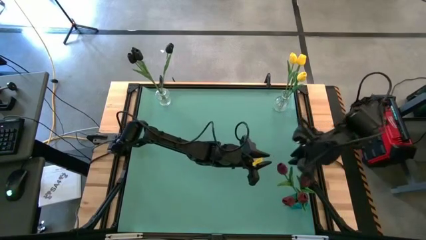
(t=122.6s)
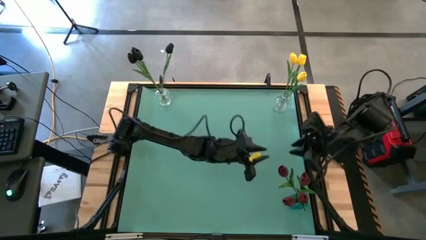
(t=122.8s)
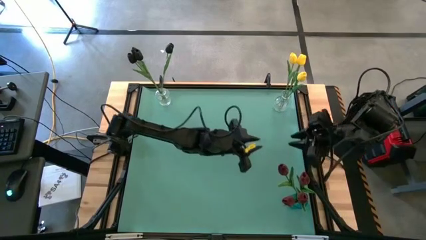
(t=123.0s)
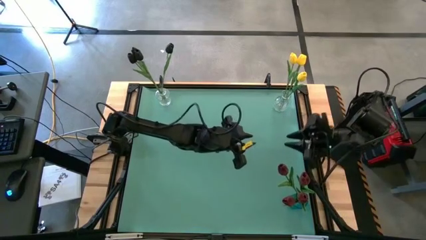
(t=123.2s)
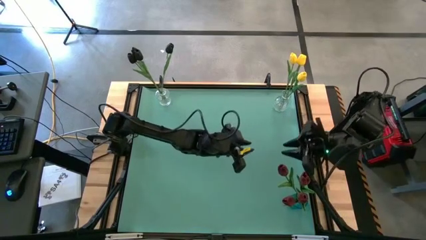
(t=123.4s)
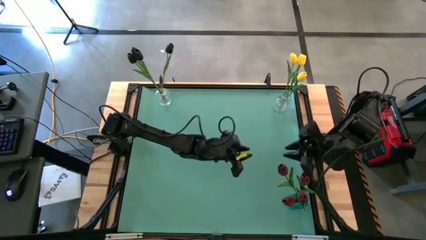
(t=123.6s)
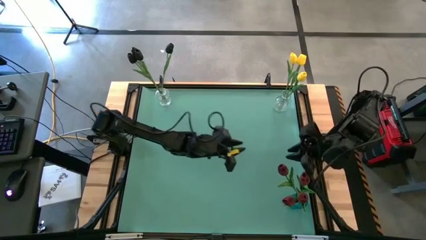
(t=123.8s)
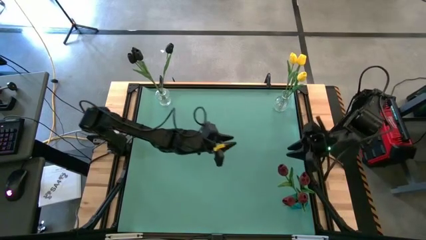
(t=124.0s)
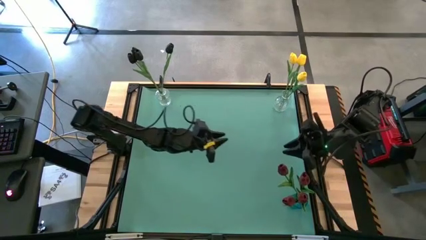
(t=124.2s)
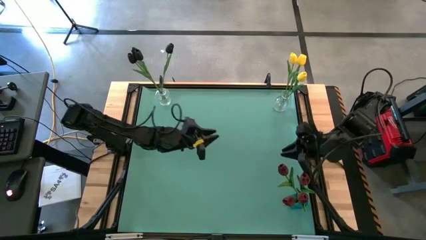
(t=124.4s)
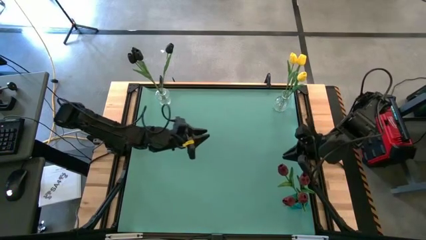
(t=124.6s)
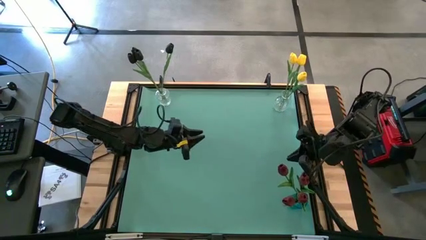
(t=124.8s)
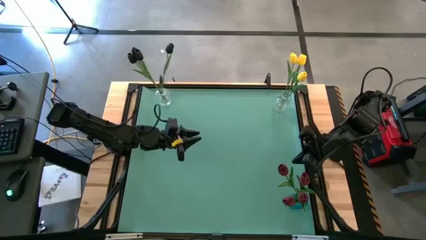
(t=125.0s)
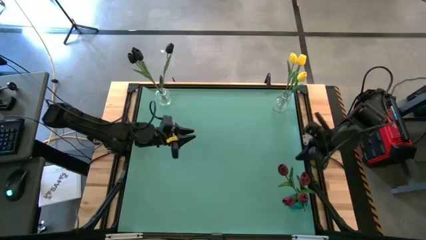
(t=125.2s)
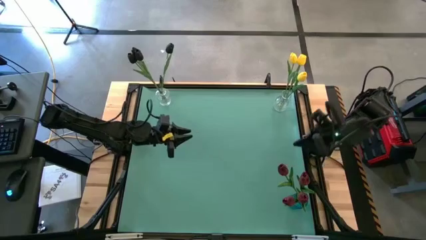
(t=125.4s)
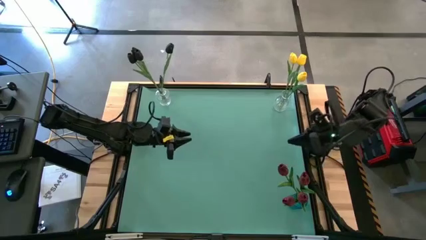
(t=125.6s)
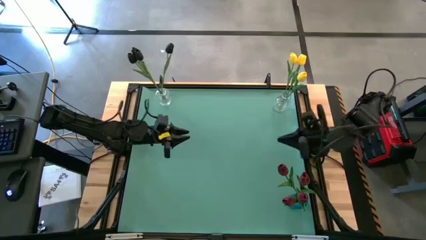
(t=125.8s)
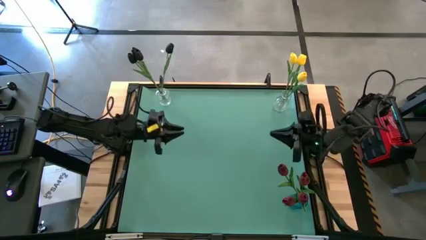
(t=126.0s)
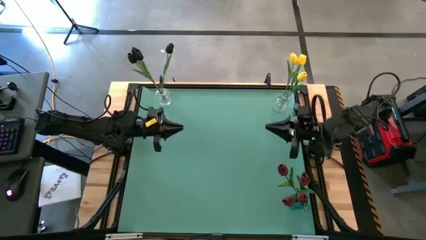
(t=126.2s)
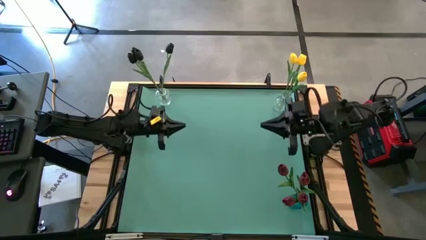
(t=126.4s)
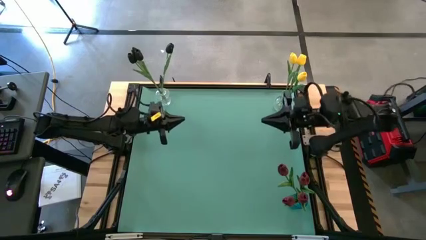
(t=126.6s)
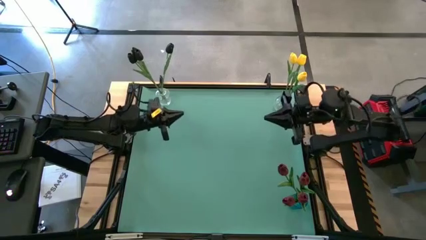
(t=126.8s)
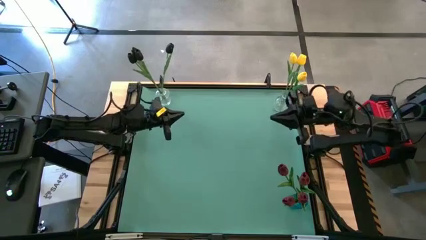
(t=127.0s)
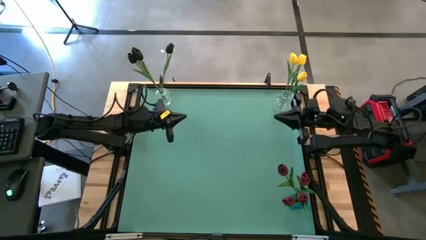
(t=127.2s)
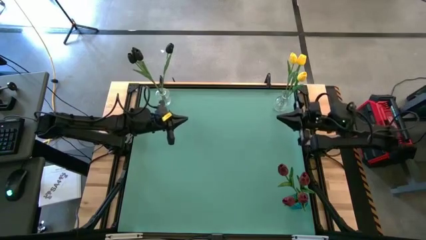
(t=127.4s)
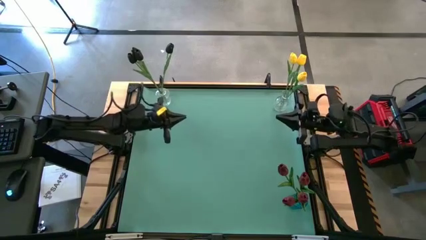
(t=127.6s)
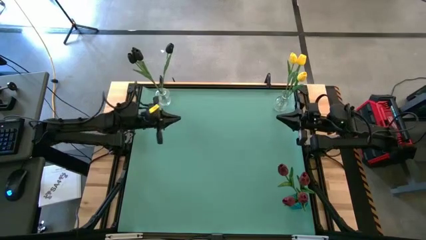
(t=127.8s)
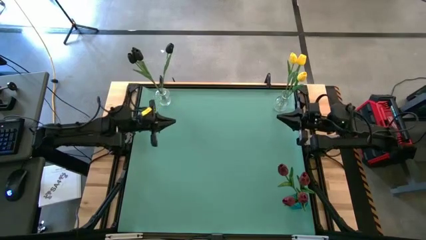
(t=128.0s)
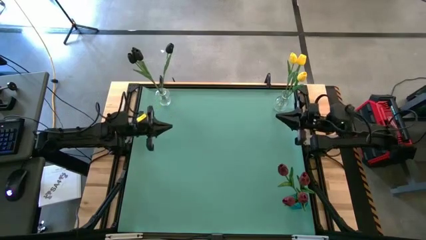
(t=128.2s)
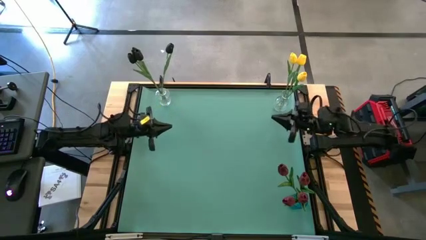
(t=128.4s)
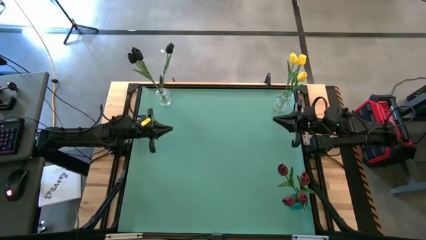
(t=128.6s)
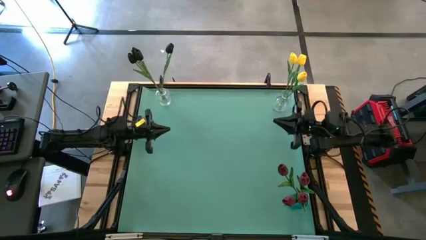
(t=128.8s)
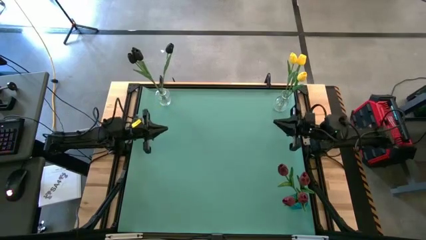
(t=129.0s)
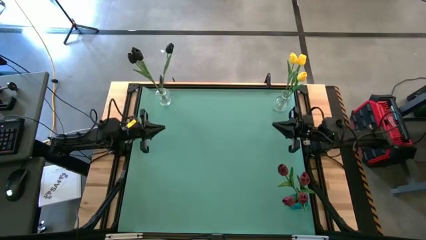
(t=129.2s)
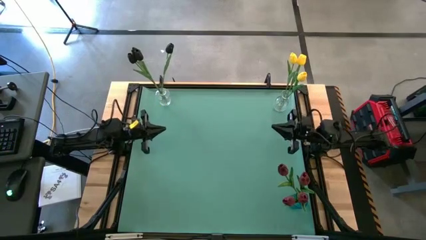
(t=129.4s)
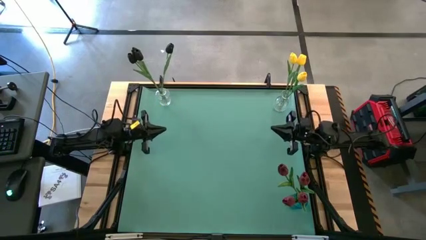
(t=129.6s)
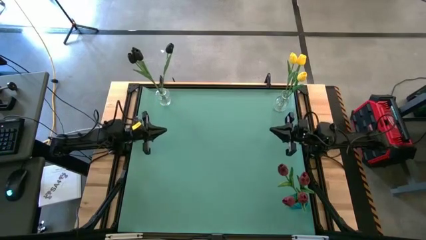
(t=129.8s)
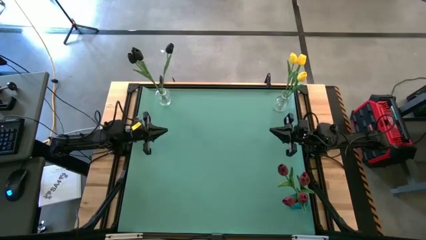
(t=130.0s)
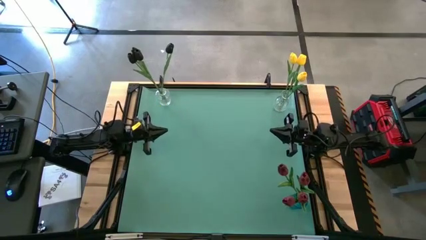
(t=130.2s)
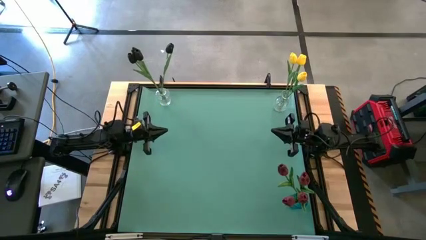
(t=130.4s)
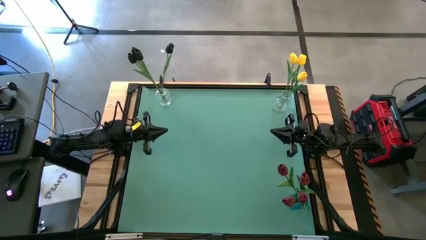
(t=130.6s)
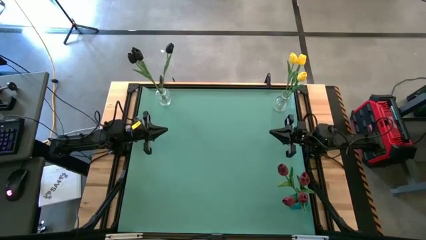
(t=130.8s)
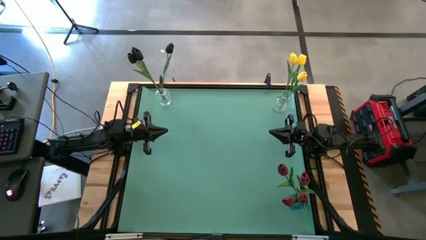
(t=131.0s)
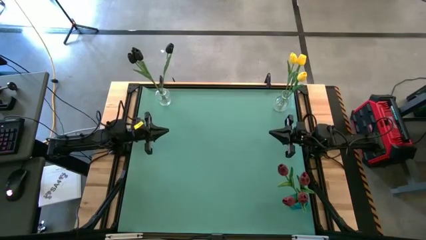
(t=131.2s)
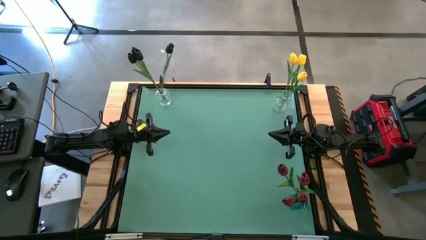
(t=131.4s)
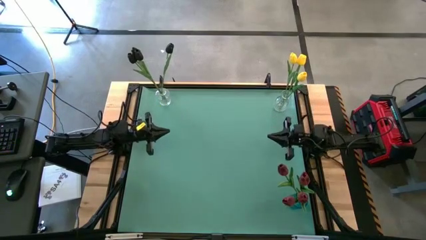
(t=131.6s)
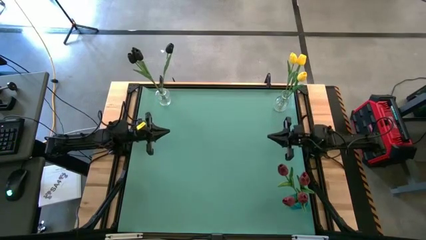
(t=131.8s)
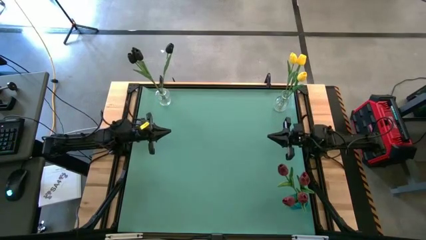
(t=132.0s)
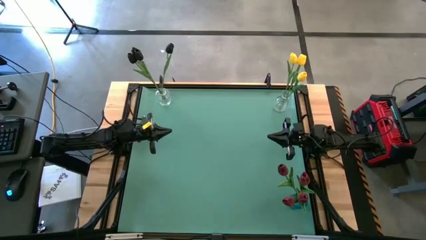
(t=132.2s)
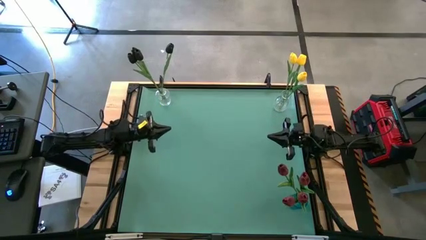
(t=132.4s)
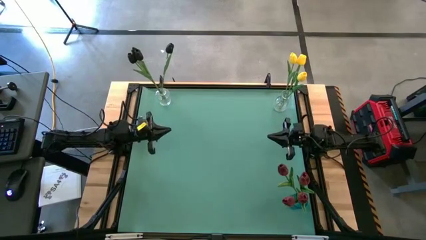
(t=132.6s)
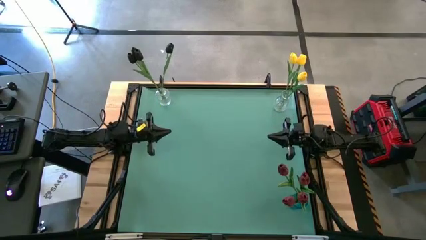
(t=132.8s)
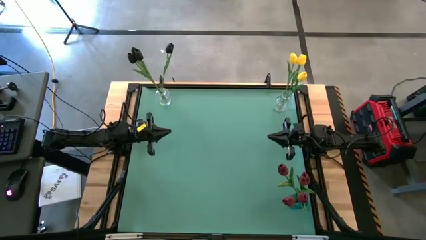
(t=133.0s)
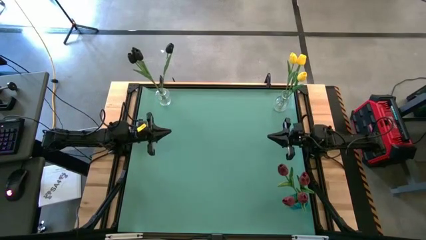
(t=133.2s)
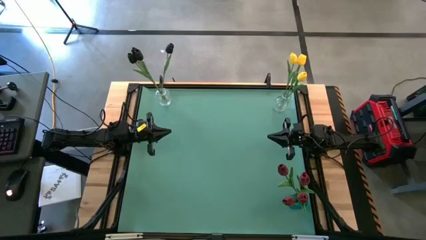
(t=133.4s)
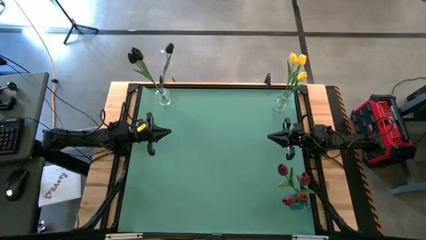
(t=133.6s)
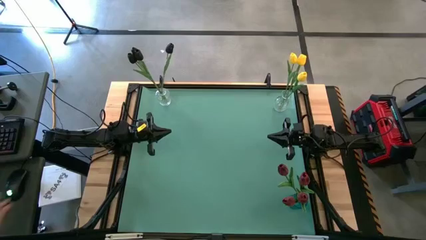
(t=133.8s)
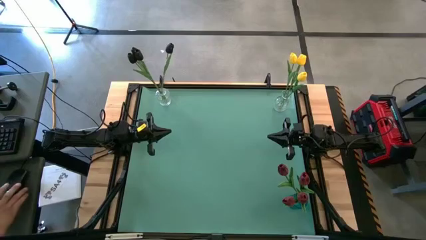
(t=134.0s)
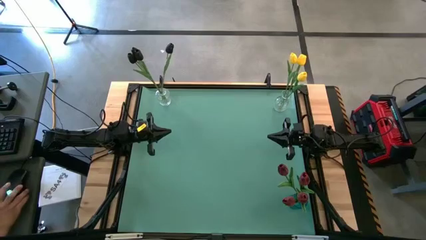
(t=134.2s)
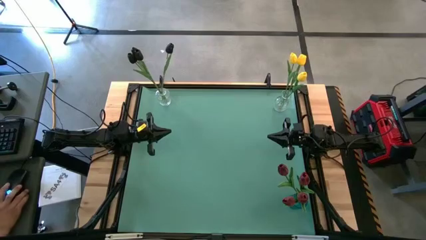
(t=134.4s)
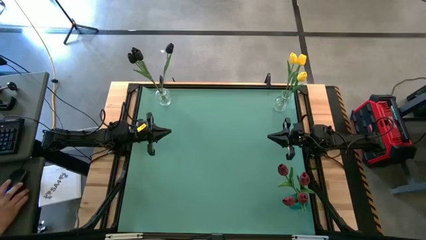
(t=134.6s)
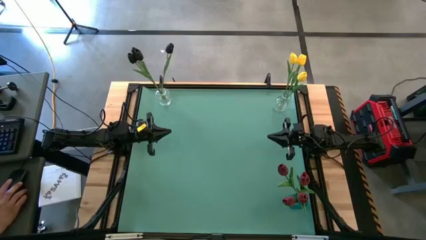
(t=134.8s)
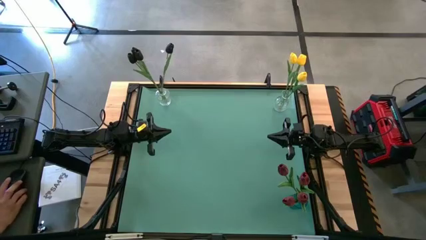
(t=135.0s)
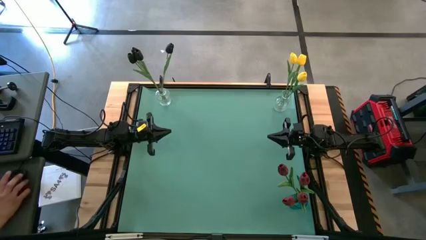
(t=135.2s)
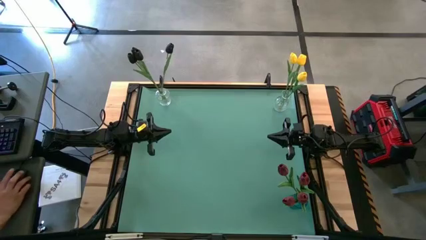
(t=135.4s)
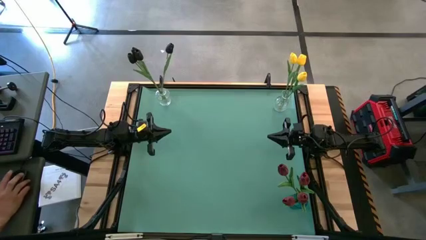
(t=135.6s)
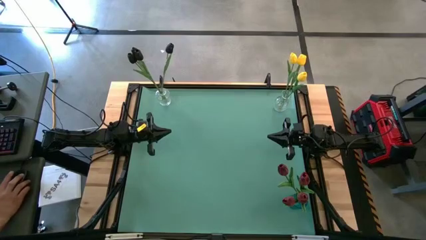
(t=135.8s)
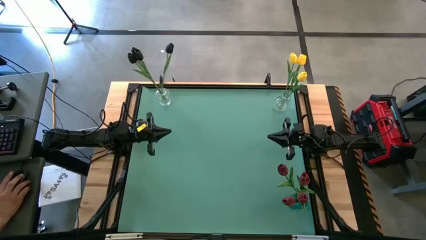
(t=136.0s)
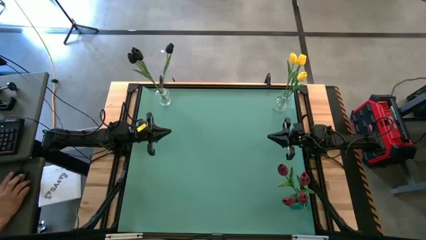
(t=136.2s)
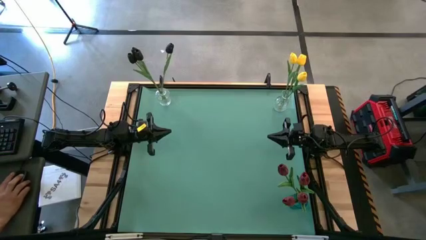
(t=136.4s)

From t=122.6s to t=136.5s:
Task: Sort flowers into vase by color
Return to Home Position
